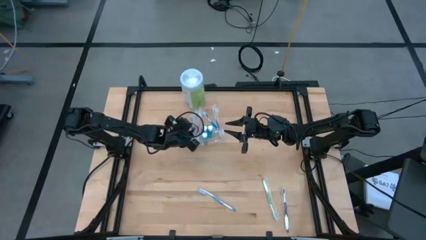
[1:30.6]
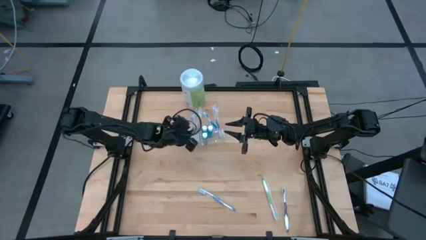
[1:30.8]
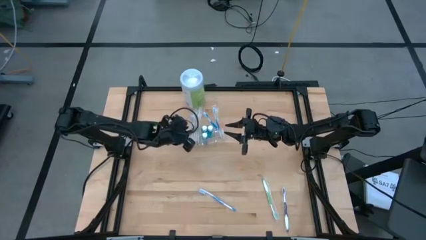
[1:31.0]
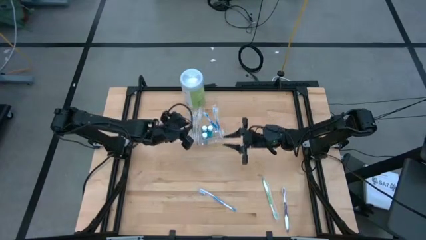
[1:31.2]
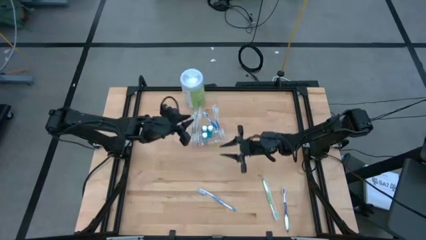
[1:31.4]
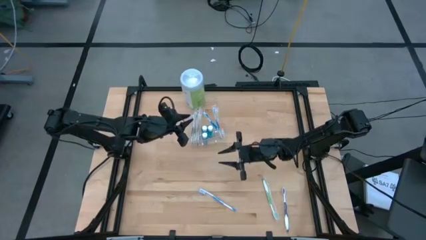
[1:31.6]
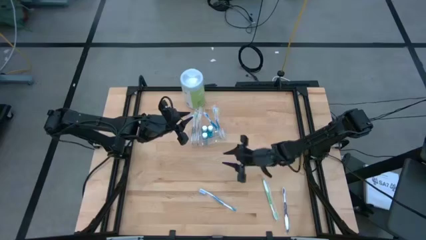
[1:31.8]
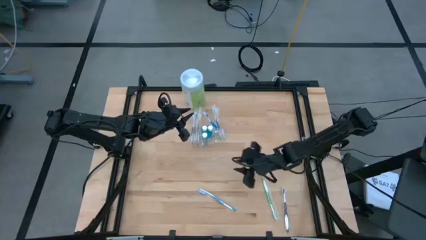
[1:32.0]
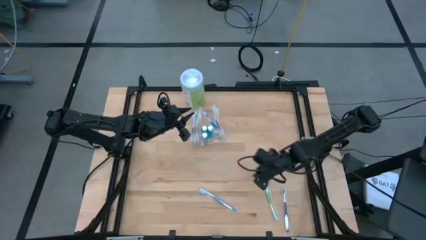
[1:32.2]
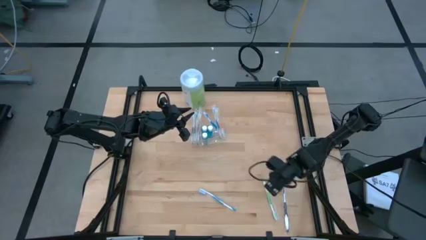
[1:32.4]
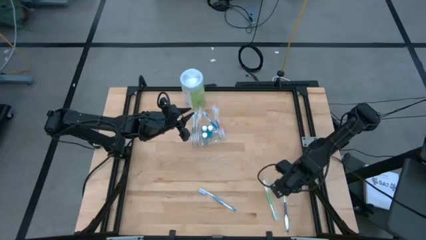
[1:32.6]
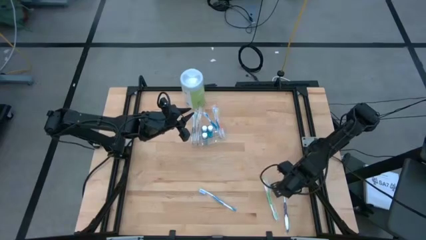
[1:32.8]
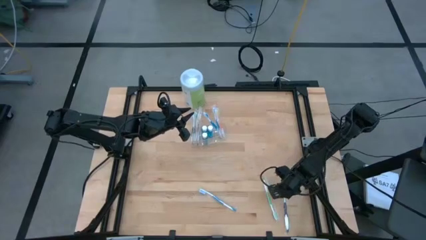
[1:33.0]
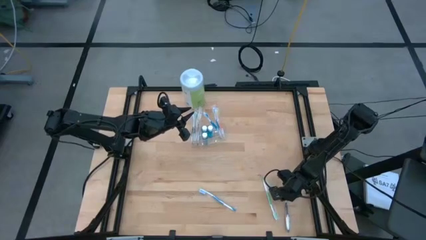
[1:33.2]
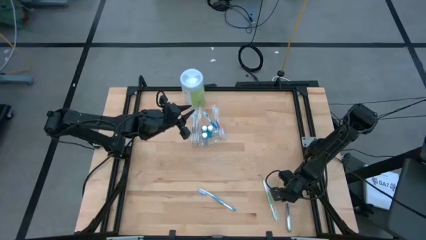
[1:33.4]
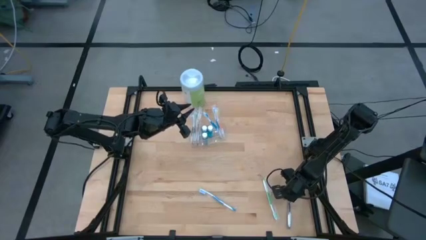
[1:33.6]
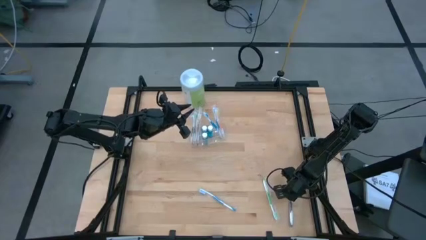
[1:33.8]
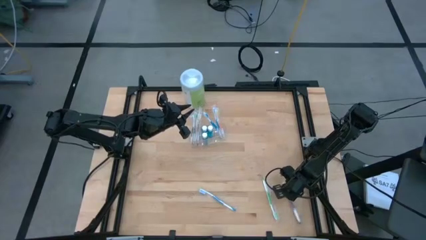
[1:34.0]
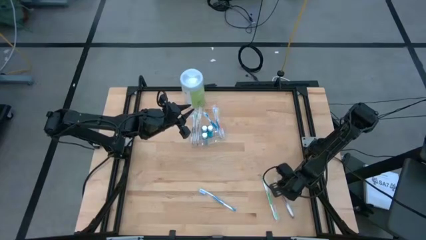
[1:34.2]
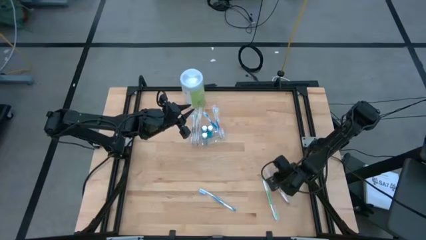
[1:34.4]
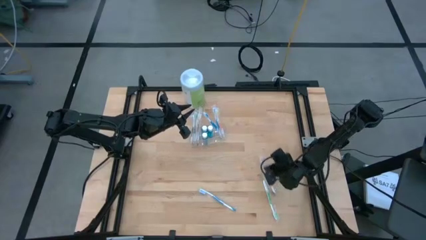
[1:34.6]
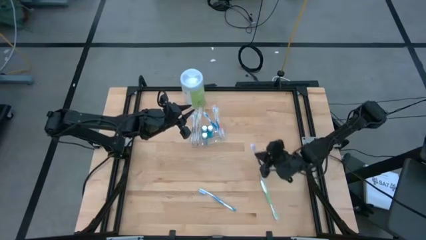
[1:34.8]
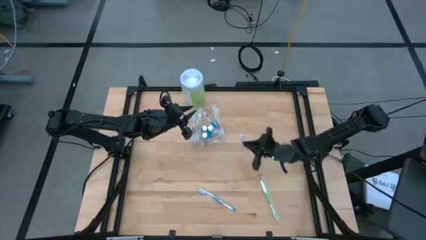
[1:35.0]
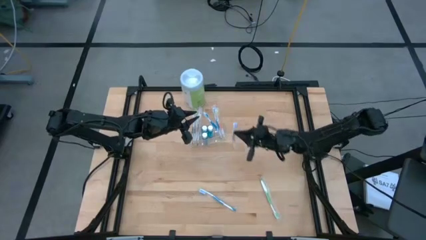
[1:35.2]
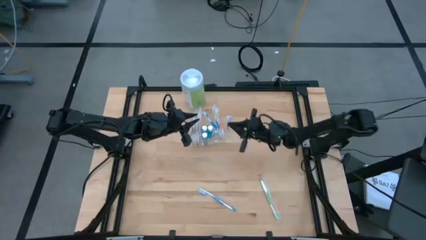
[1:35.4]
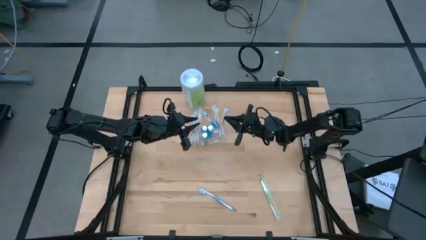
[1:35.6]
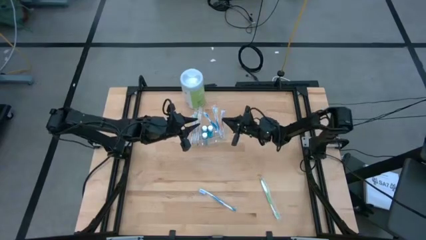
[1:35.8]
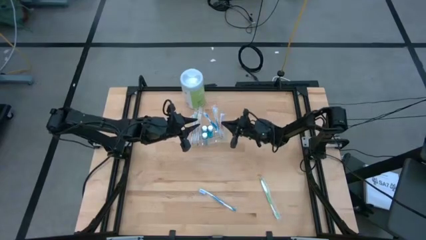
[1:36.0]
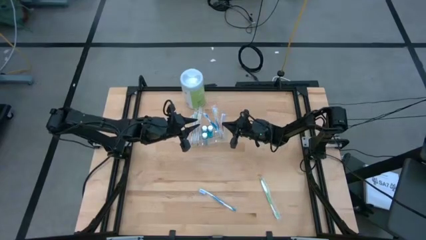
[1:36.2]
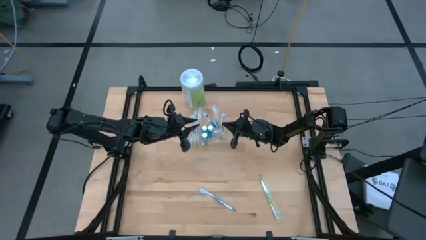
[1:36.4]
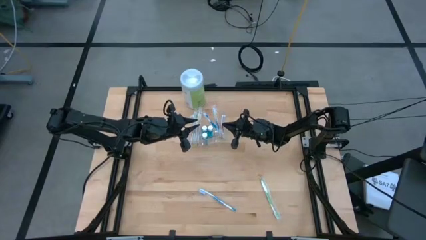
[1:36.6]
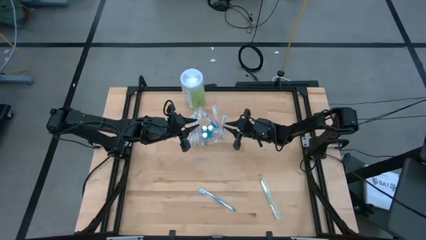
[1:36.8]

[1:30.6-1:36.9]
Task: Pick & Place toothbrushing station
Put the violet toothbrush into the right side of the transparent organizer

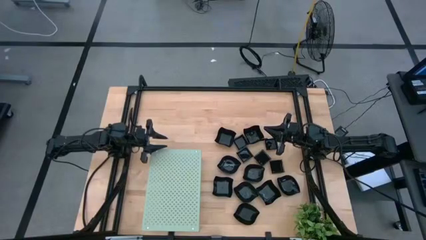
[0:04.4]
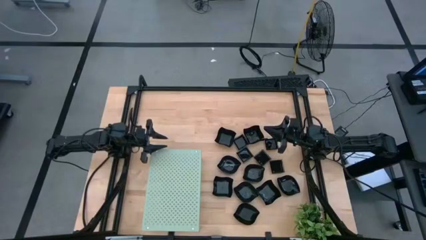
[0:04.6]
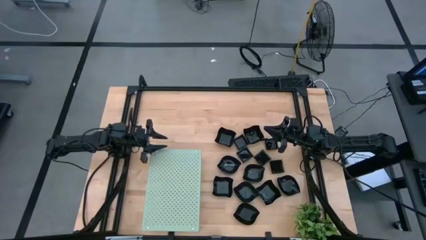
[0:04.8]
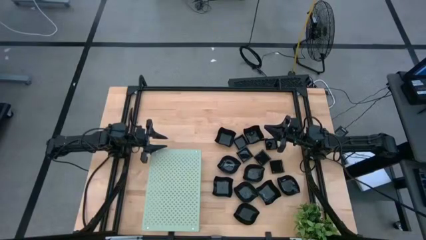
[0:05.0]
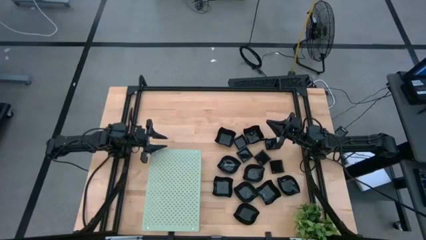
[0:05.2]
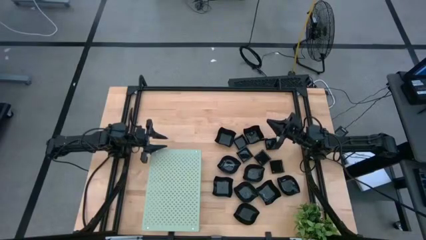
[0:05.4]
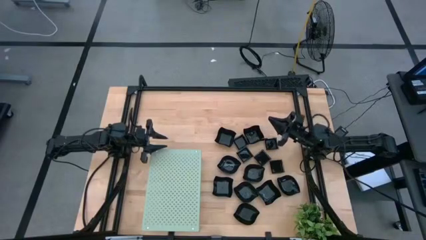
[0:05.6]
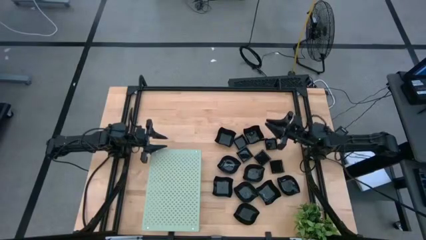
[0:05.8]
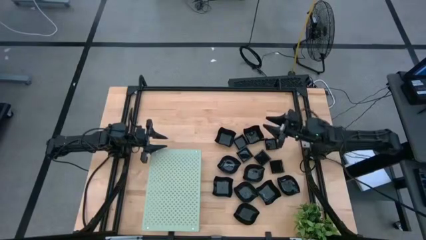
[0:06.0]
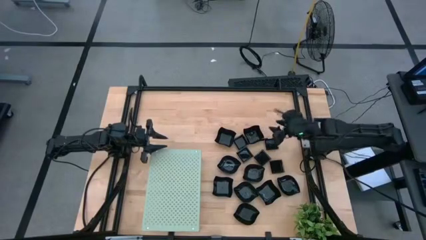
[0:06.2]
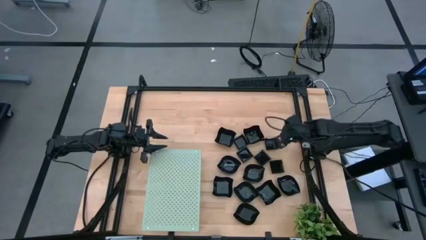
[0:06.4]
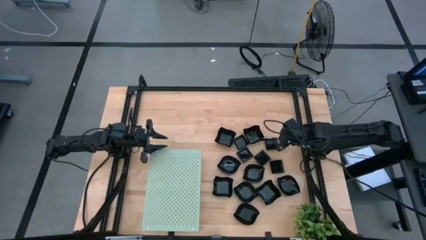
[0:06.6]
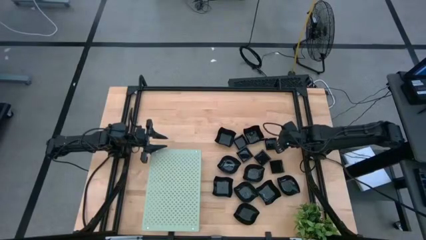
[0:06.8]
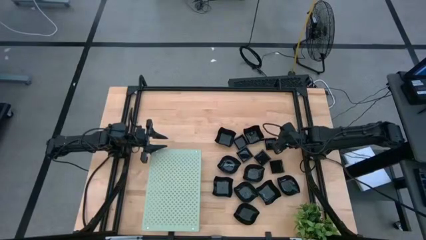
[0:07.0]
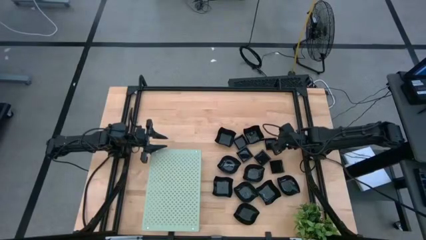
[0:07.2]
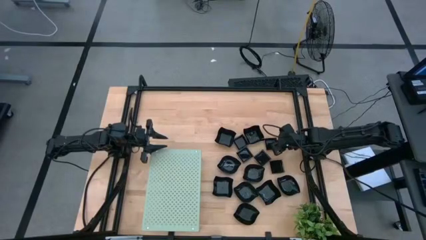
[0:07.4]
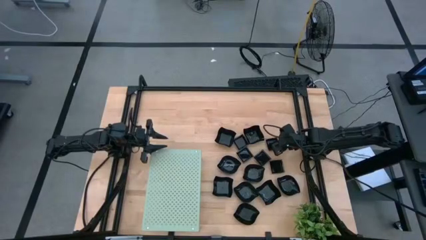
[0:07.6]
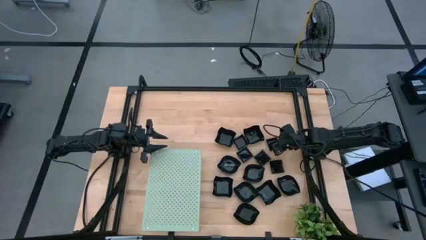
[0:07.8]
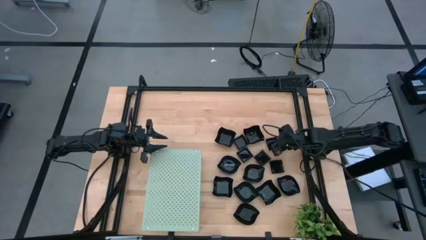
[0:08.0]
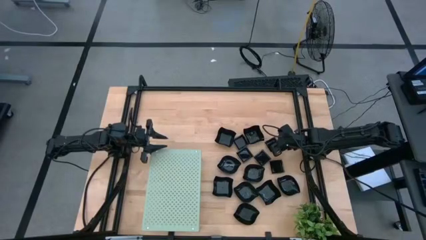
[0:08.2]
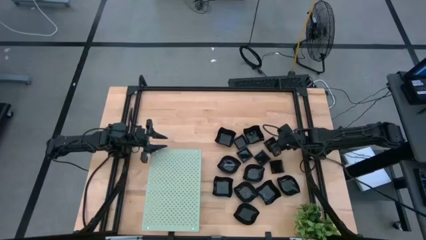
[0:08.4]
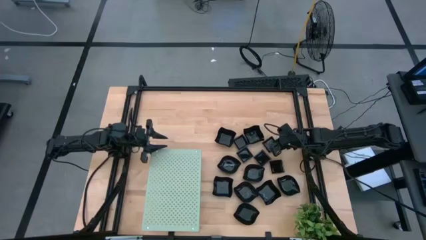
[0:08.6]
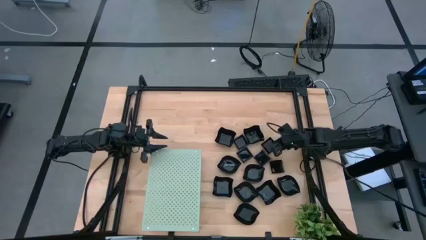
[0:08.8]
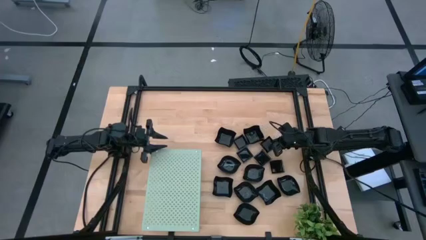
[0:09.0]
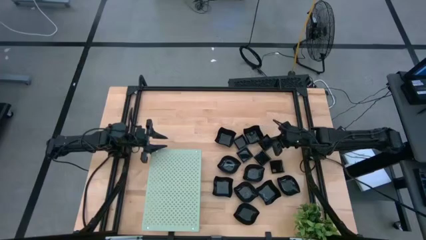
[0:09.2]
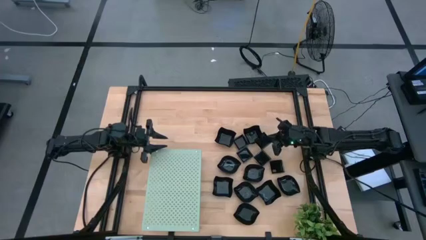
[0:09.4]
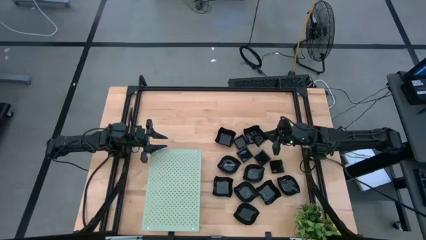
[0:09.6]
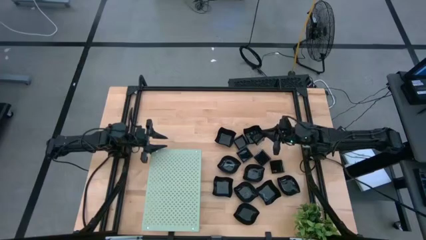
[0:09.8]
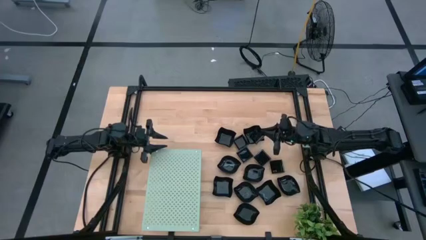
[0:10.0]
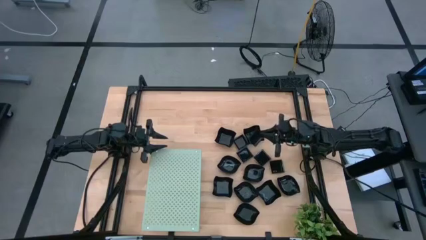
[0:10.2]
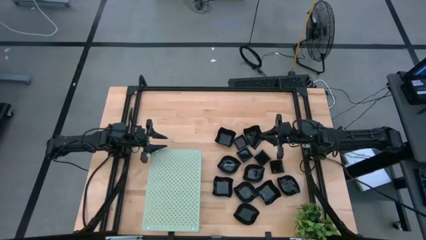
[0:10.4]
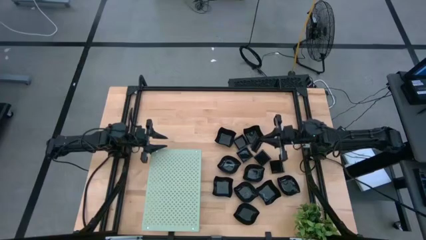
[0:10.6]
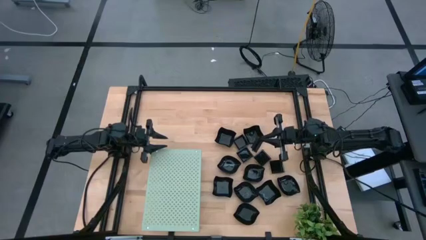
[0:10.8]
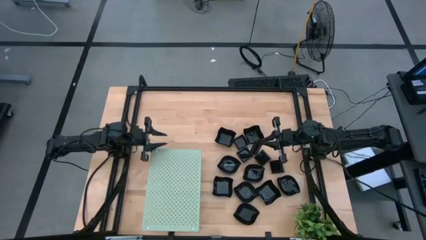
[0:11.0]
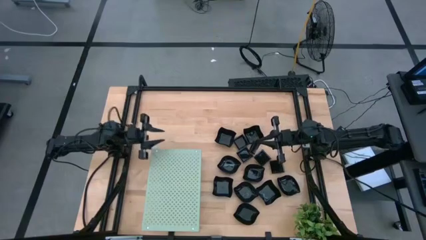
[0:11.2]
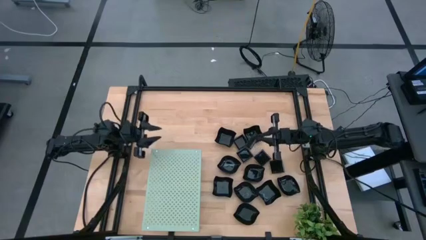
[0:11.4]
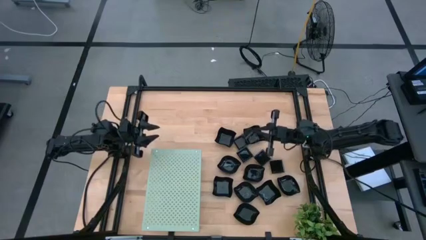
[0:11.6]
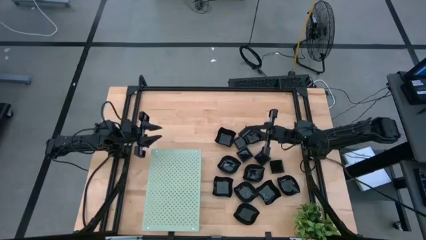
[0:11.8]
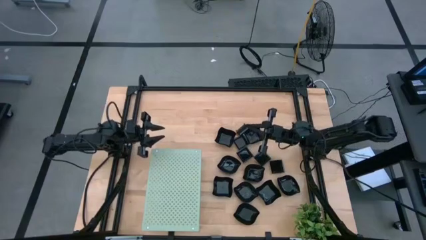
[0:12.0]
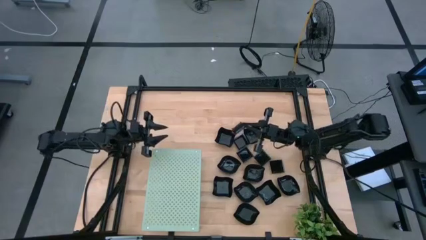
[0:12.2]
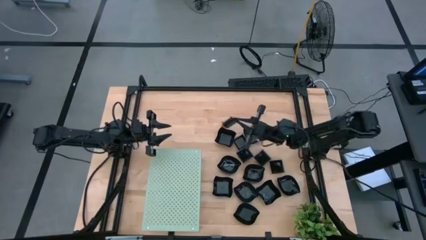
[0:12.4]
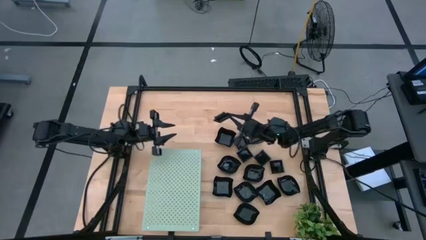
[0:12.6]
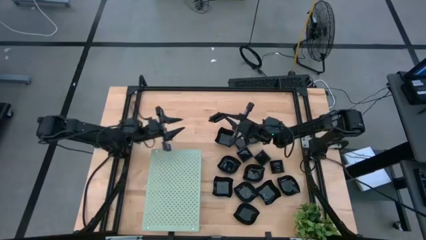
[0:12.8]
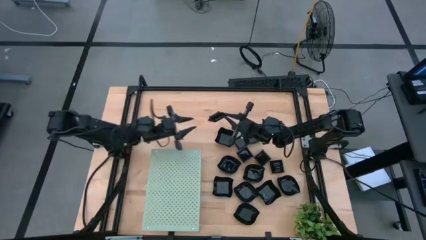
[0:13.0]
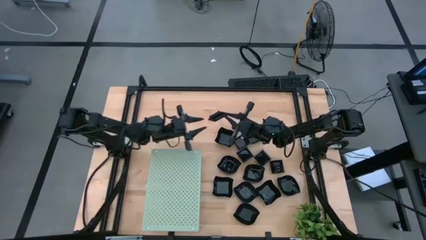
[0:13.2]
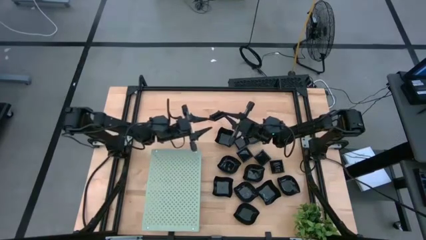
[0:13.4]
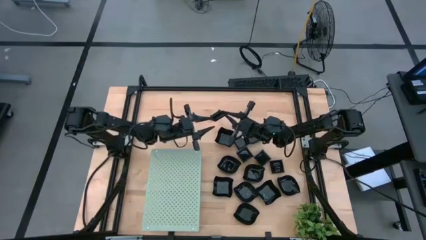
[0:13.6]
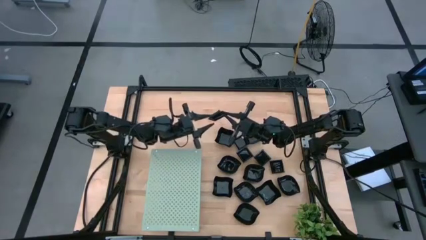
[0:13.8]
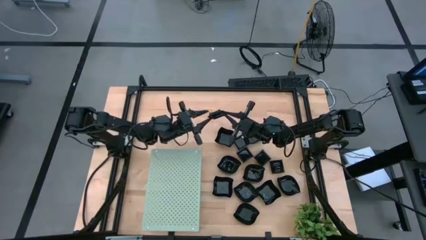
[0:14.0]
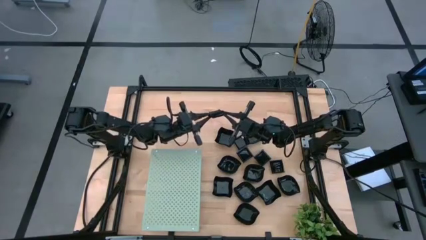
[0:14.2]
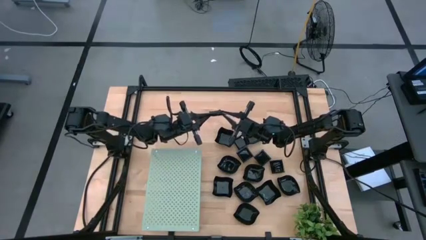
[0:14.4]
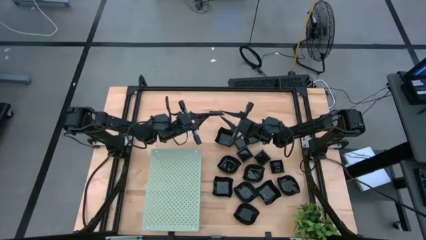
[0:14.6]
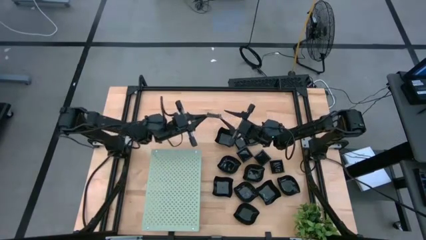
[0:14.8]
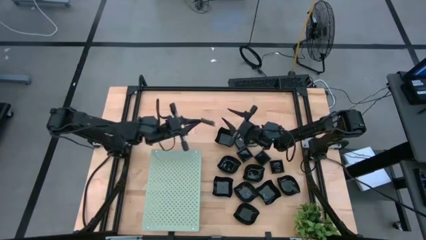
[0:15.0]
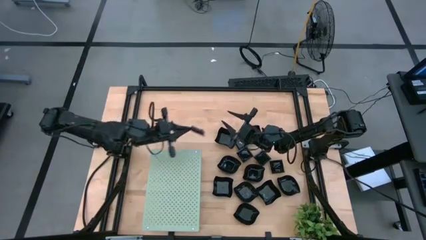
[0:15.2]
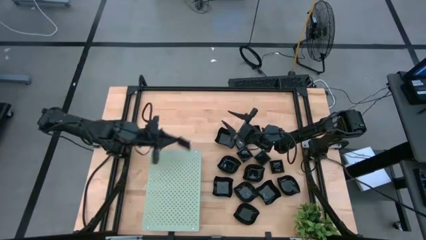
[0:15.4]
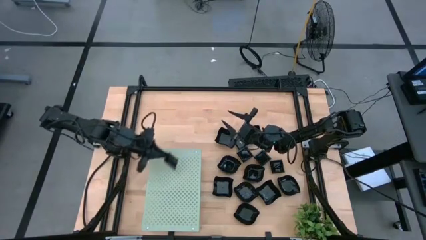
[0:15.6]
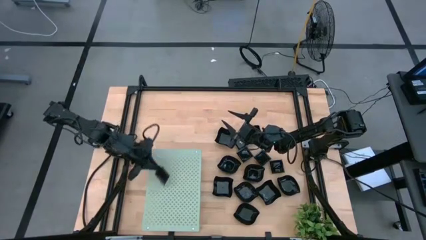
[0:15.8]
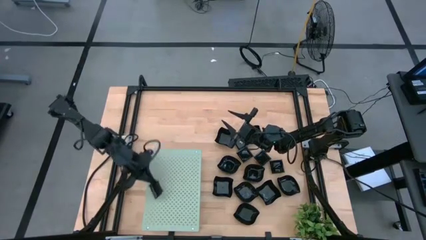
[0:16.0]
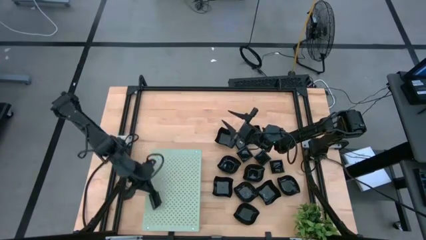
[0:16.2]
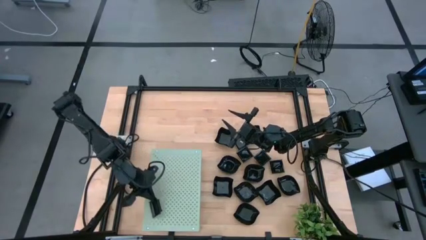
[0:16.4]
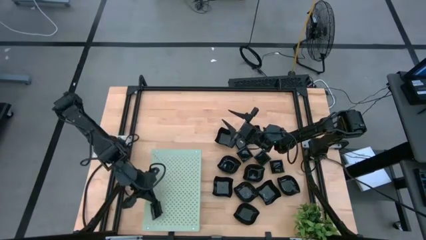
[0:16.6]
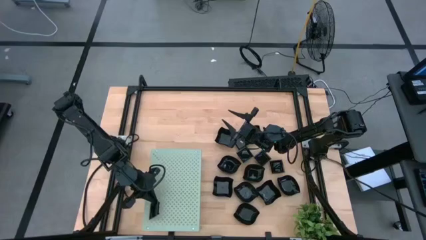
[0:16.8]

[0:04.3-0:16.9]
Task: Pick & Place Mini shaped plates
Put the square plate on the shelf
